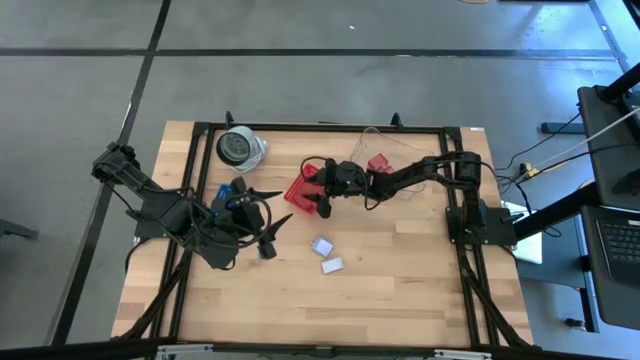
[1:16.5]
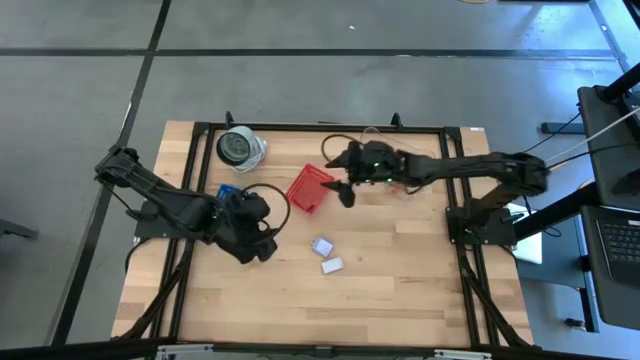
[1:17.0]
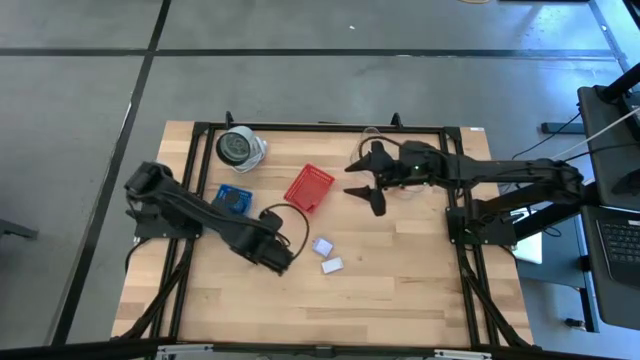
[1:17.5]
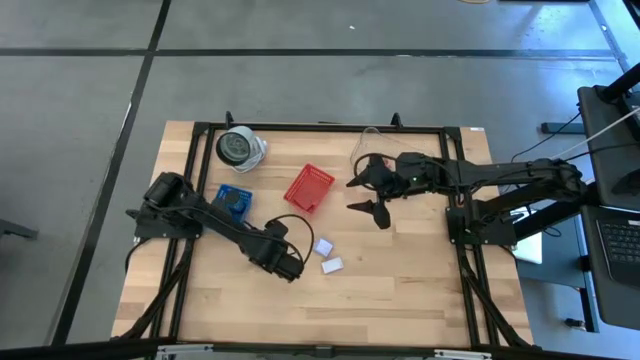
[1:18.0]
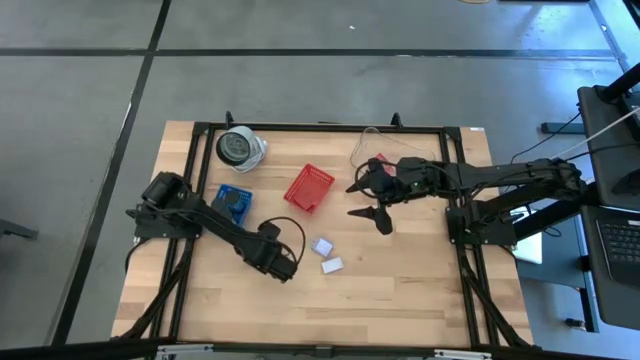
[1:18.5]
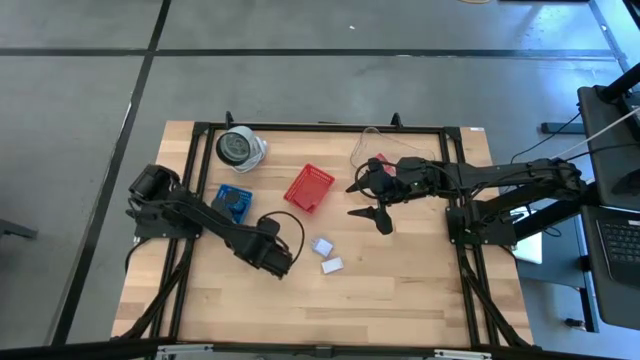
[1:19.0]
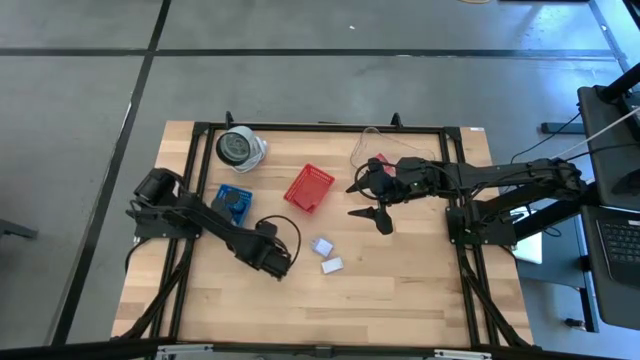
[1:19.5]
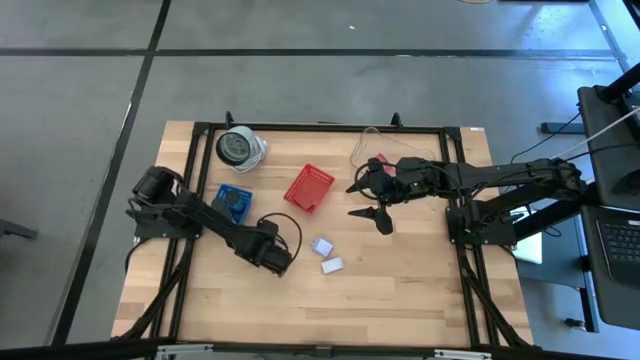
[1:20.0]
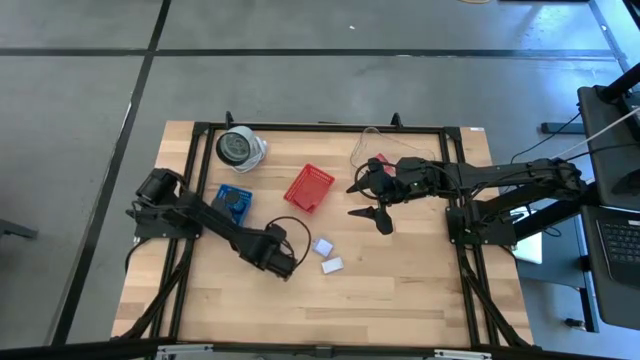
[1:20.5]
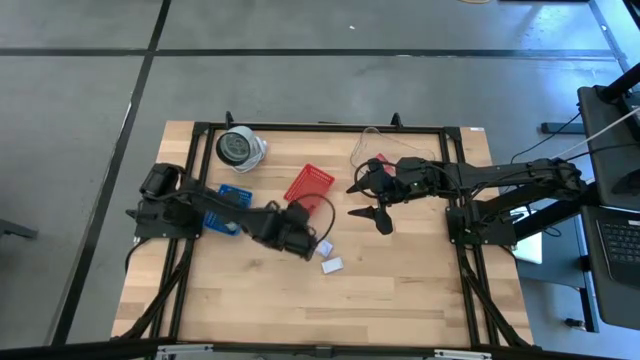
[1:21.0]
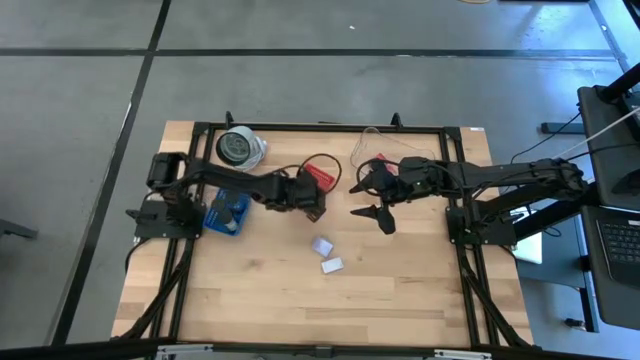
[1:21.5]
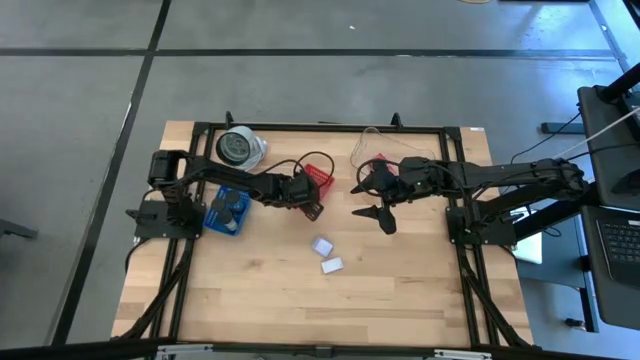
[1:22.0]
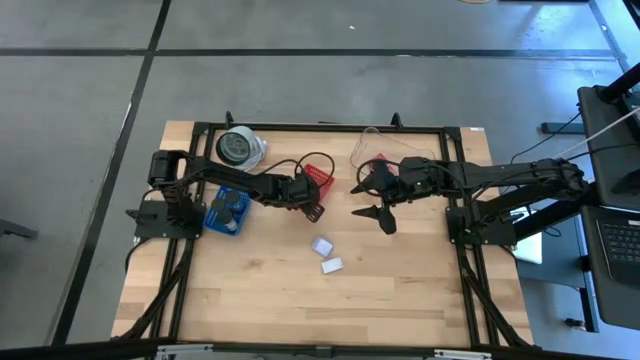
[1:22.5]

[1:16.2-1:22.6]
Task: Pick & Place Office items
Put the blue digital clock into the red bin

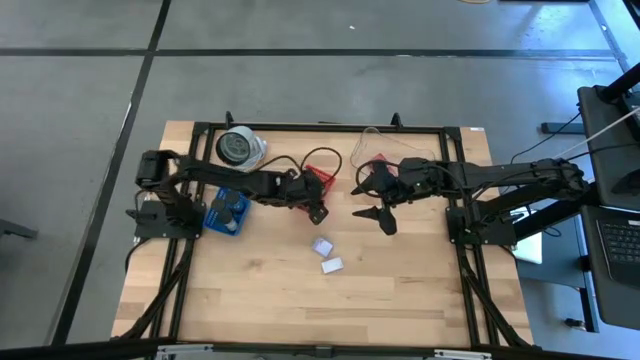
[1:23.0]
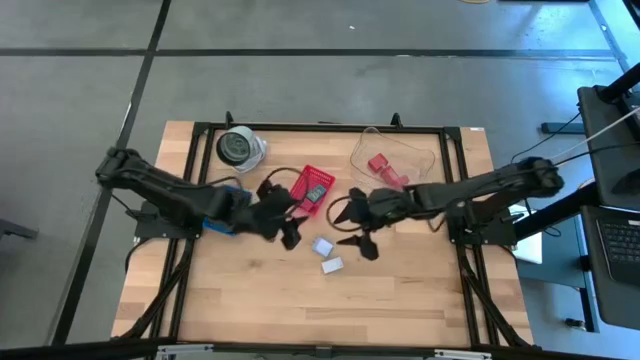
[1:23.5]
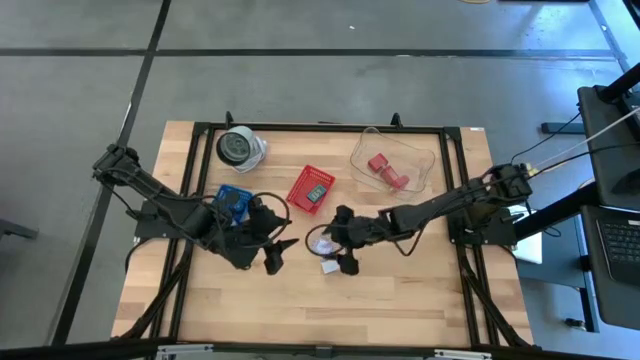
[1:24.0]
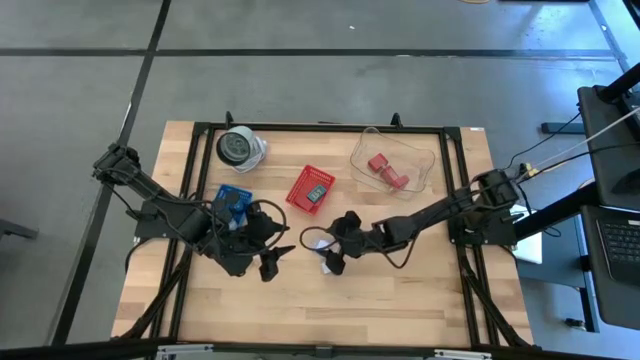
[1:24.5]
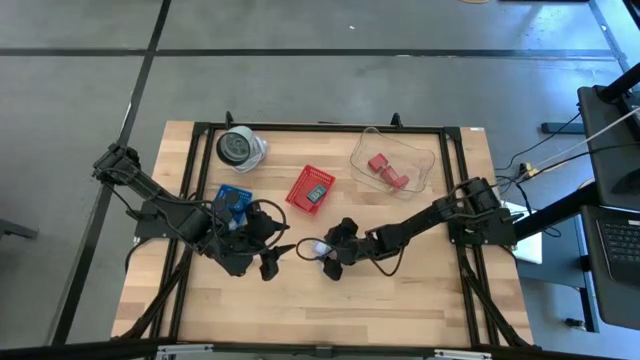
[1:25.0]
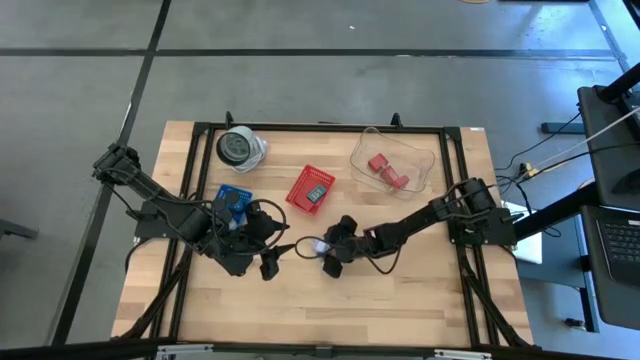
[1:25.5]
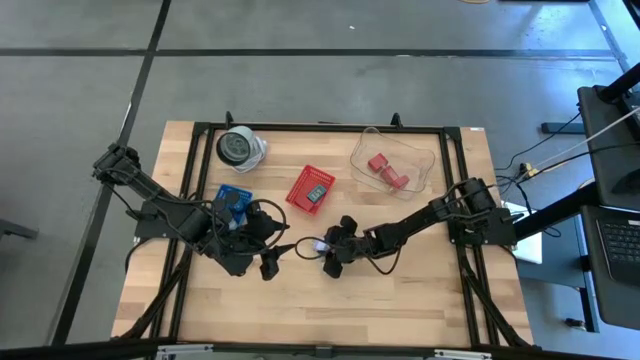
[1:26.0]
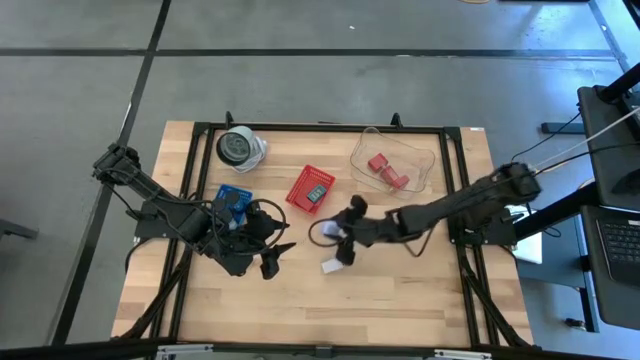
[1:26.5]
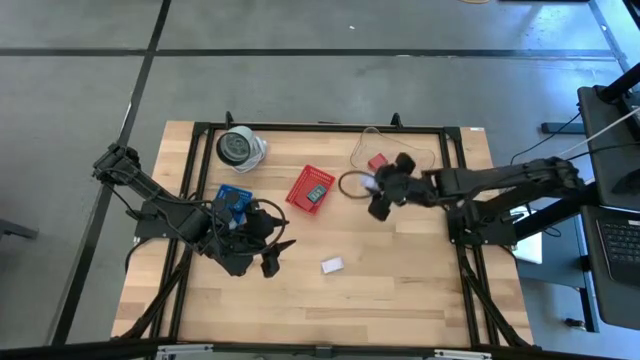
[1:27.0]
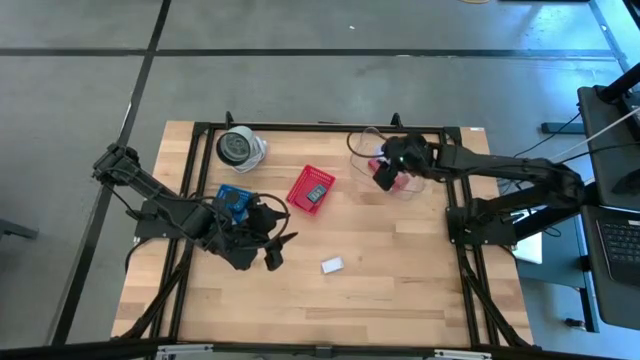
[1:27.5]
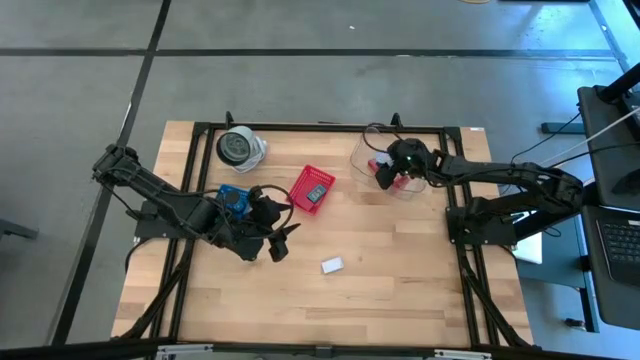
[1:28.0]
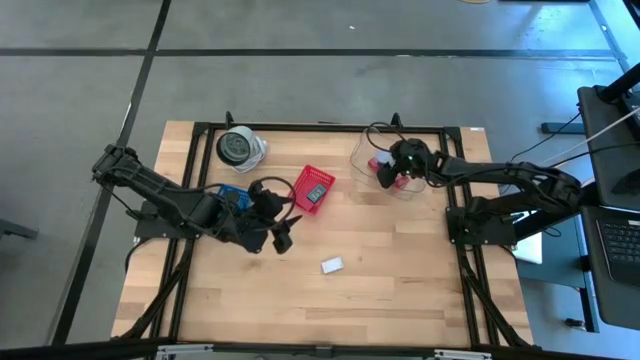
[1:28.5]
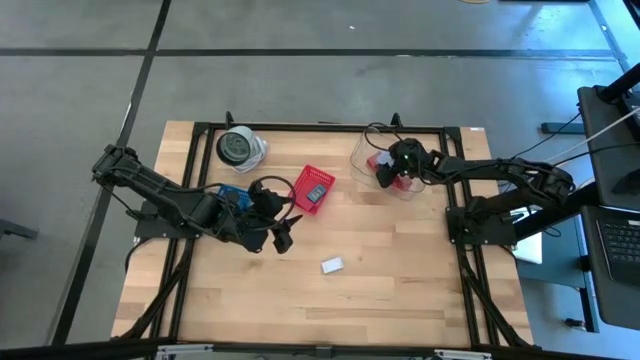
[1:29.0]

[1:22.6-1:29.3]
Put the light blue charger adapter into the white bin

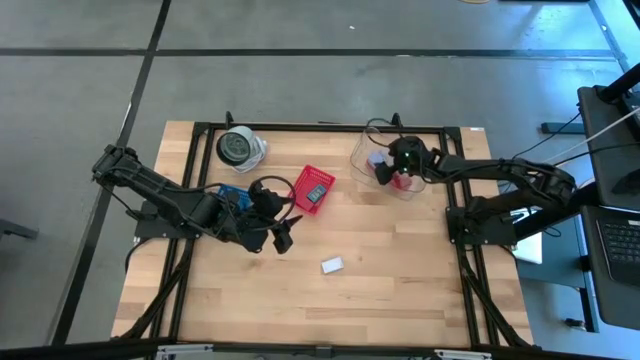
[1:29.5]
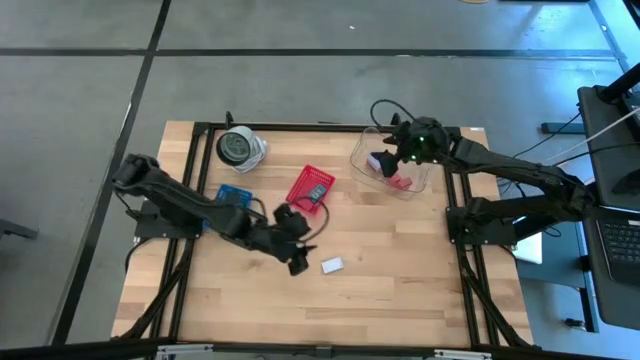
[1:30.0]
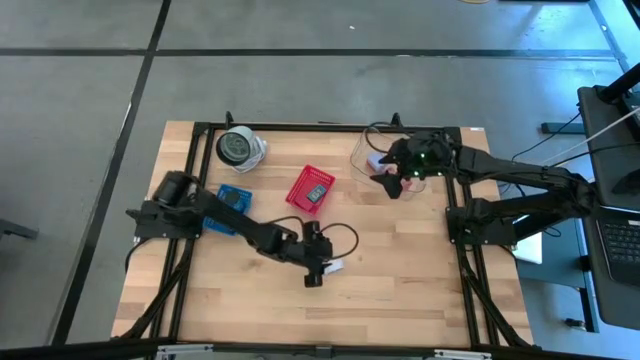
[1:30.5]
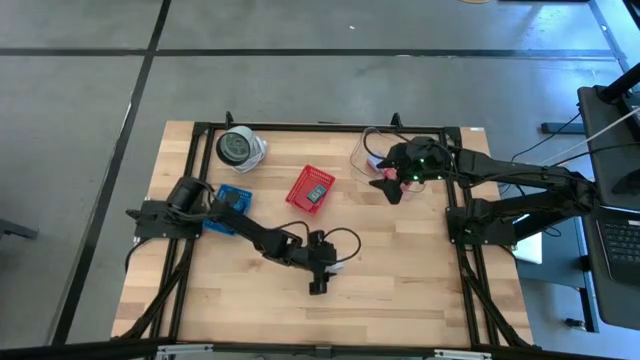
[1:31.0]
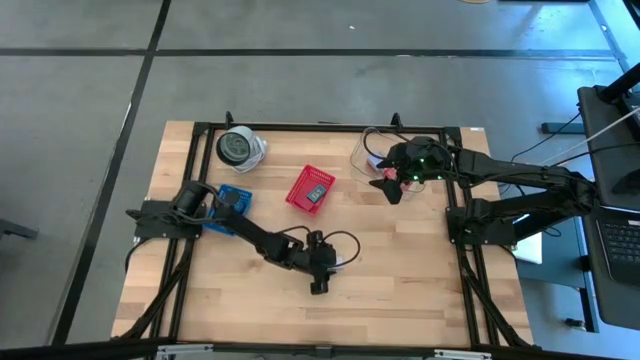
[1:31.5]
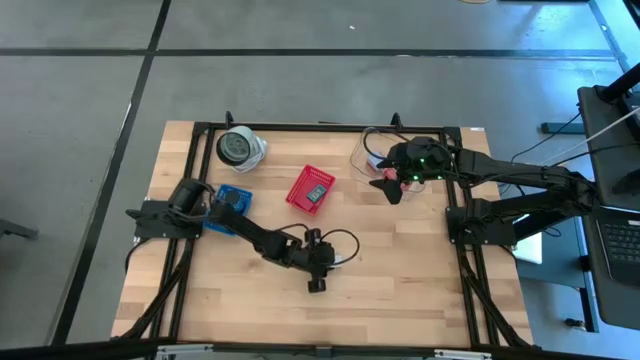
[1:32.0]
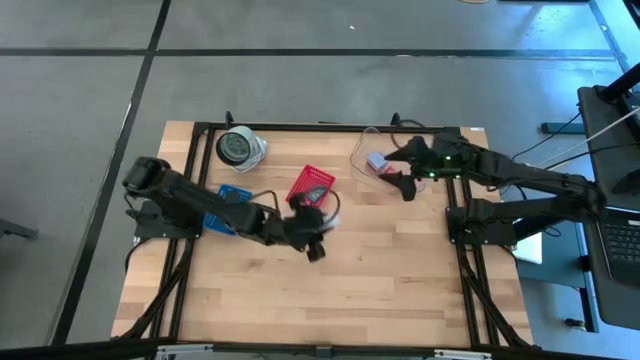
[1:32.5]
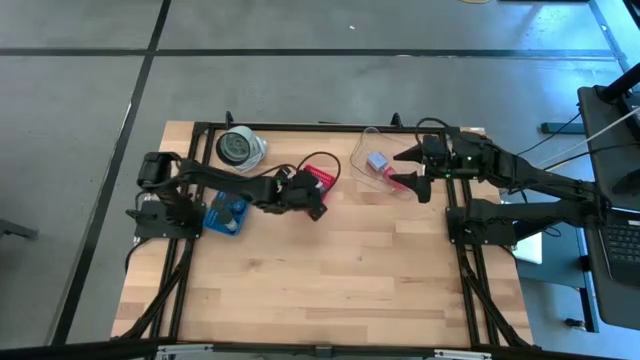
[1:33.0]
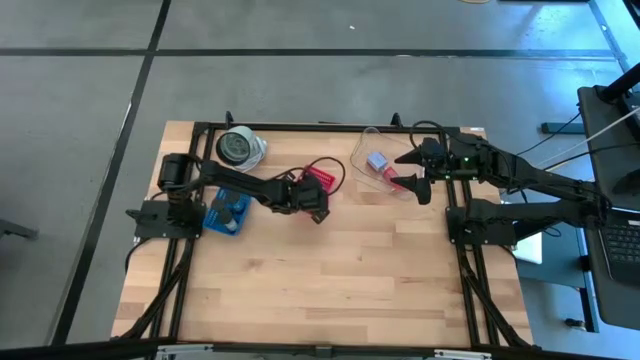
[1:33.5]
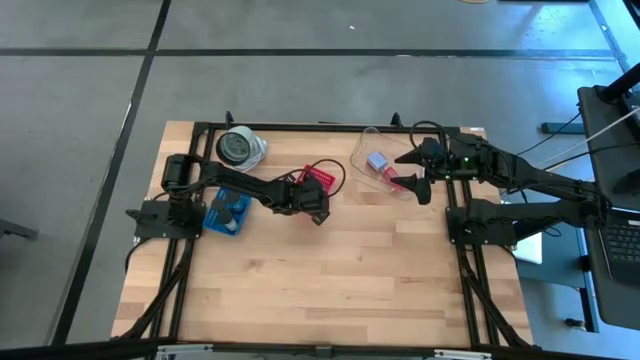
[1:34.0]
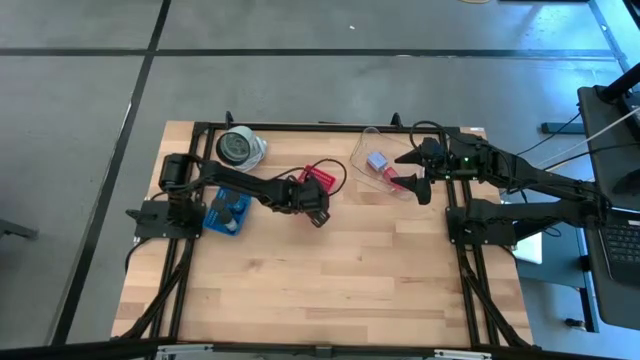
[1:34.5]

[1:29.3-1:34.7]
Put the white digital clock into the red bin

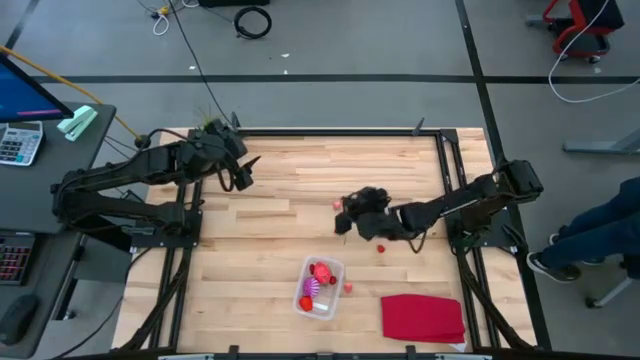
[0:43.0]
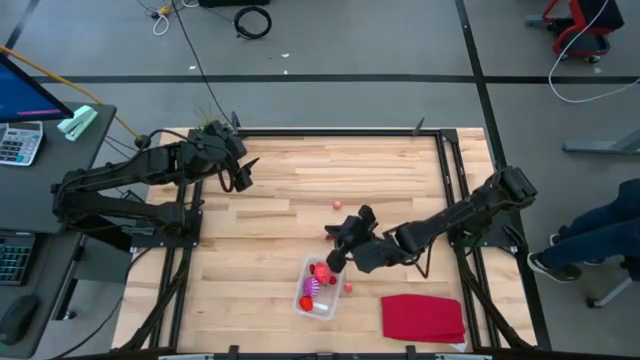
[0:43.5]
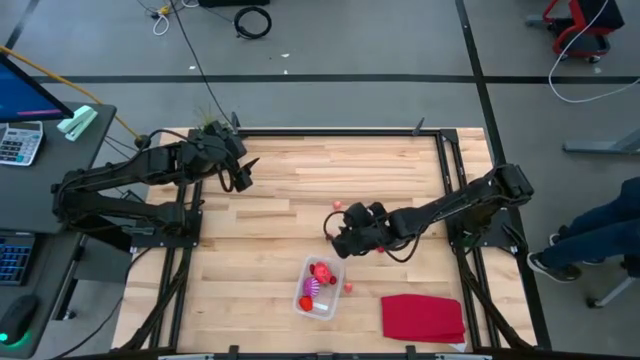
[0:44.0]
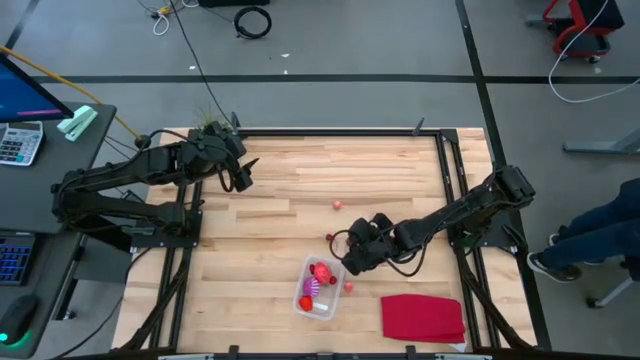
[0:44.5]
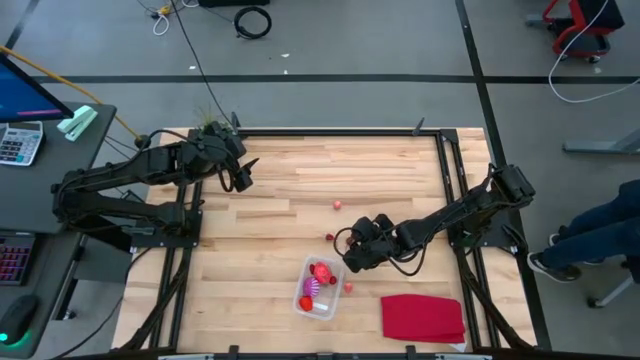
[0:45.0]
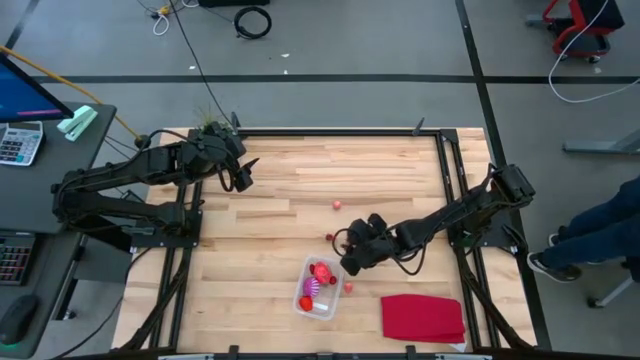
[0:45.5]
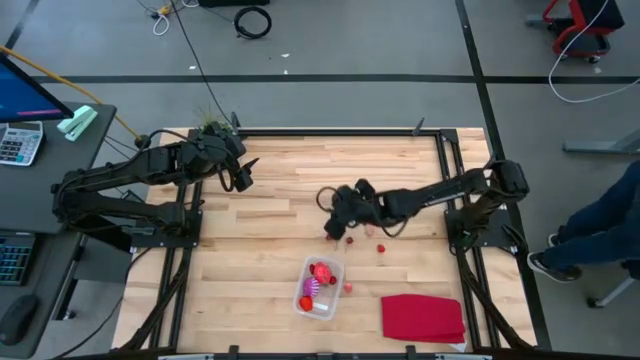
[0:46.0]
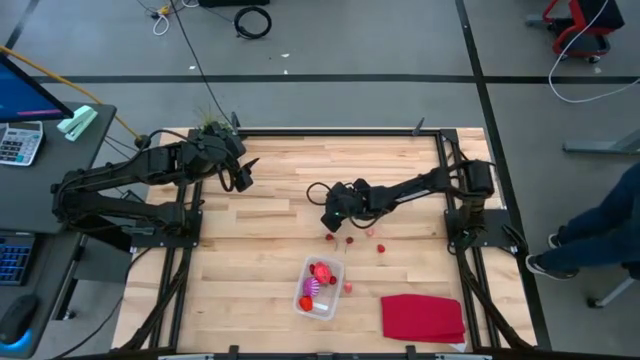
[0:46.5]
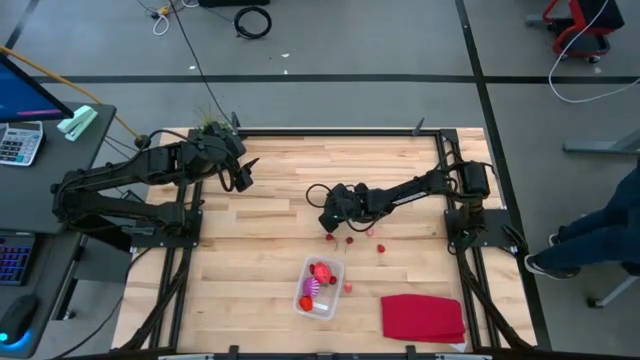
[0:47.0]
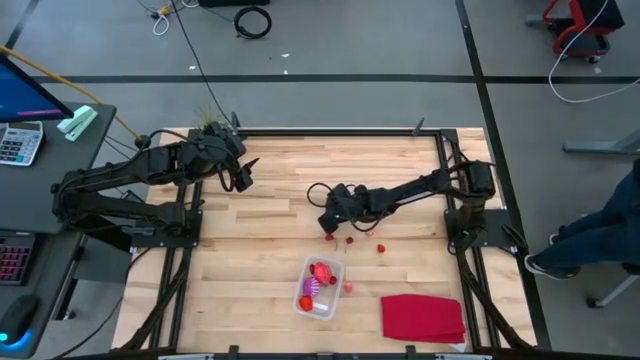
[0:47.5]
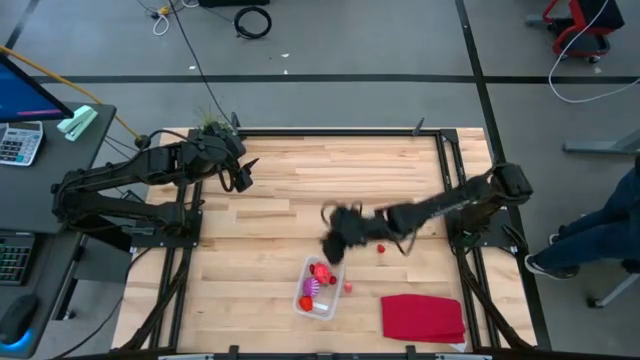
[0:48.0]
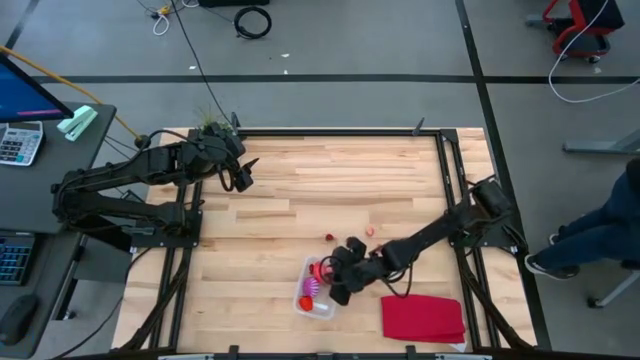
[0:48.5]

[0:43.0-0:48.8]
Task: Pick and placing Produce into tupperware
Put the top pink peach into the transparent bin
